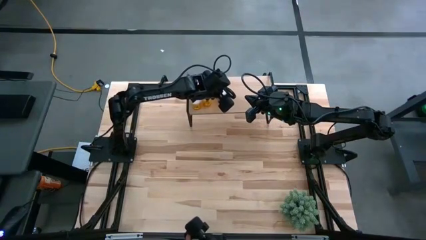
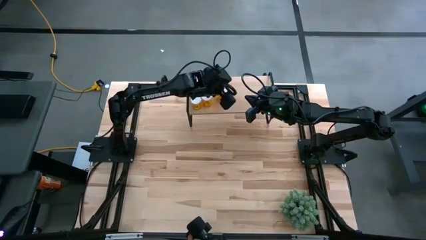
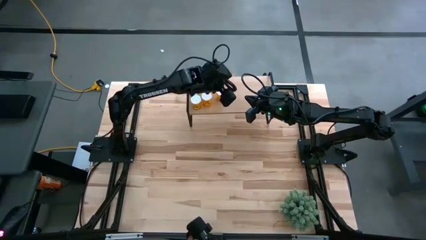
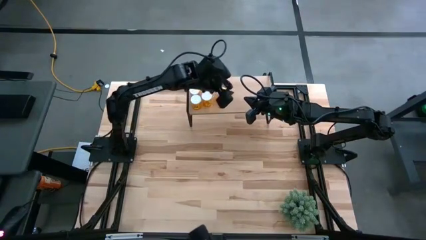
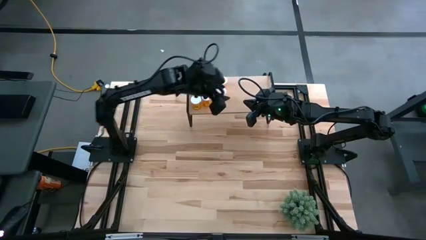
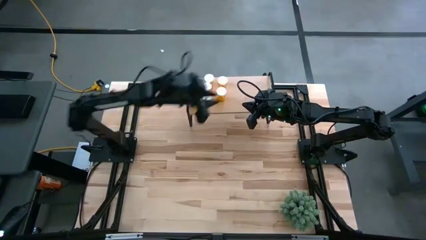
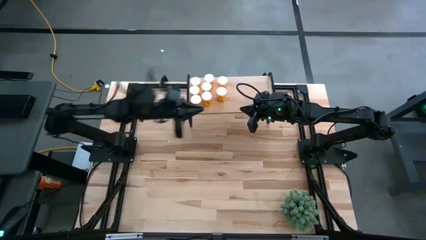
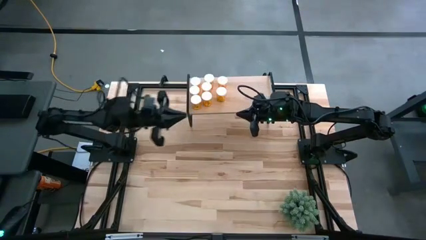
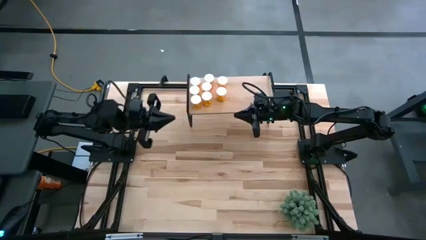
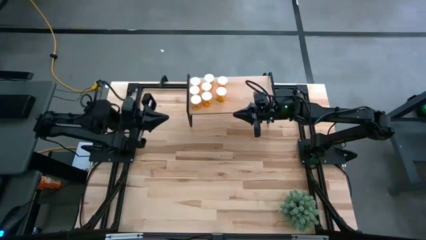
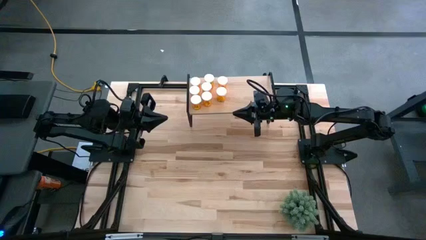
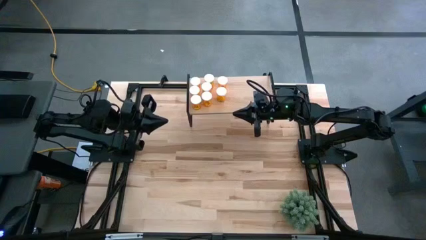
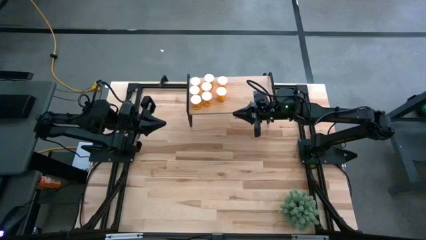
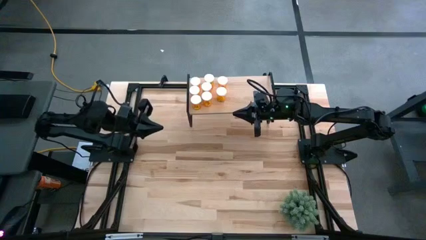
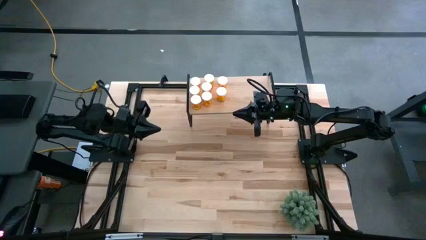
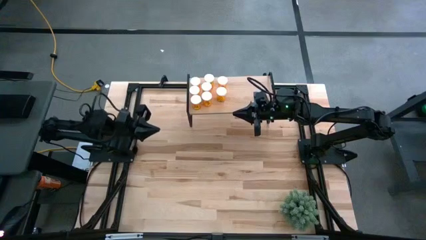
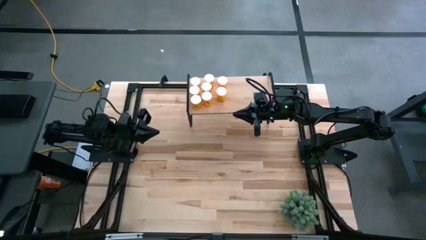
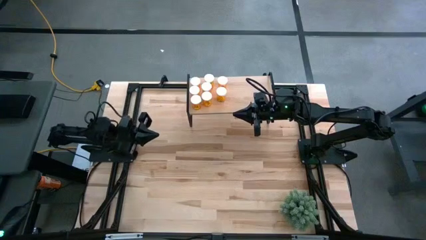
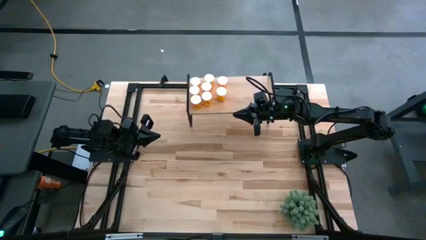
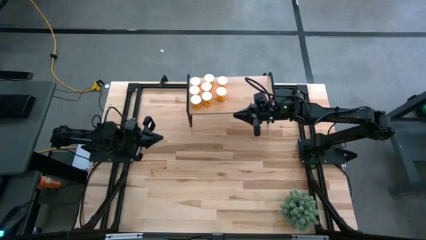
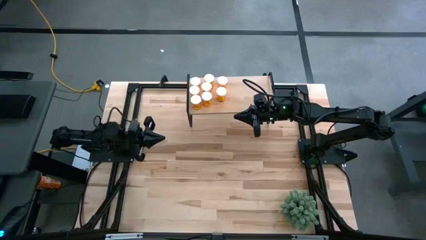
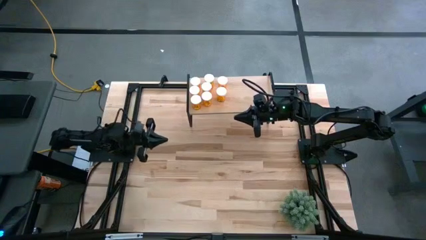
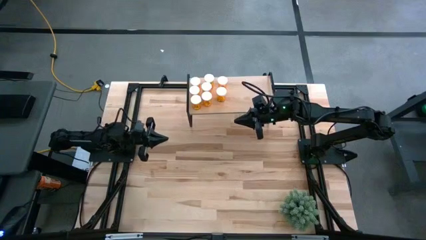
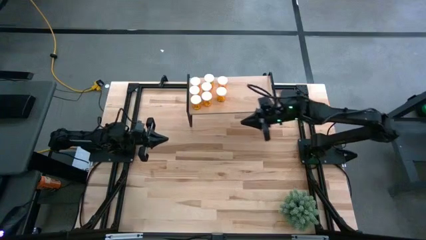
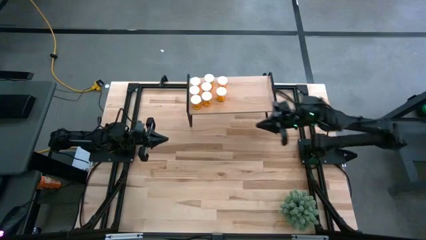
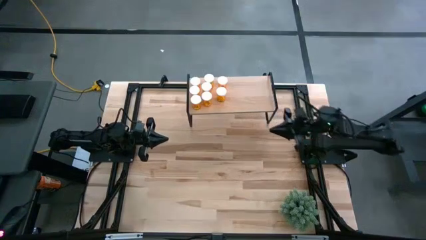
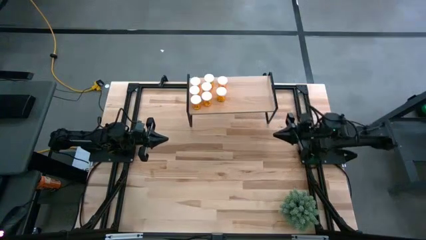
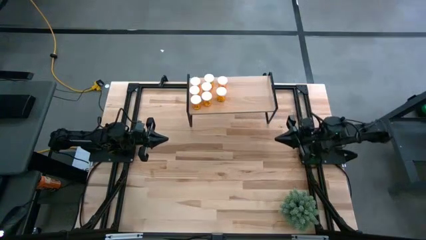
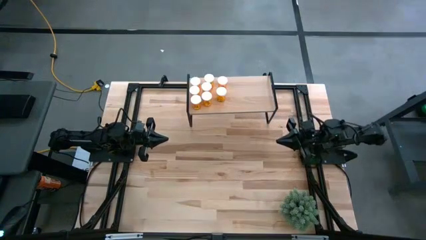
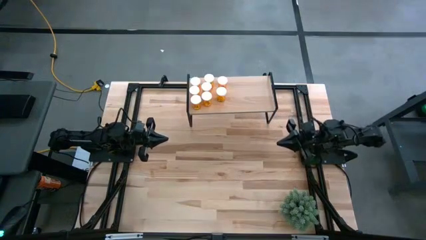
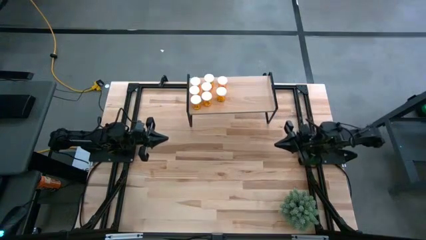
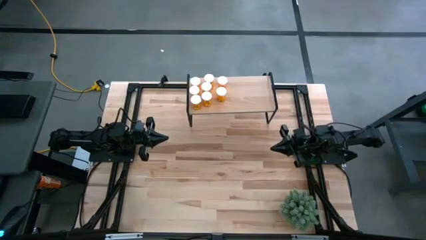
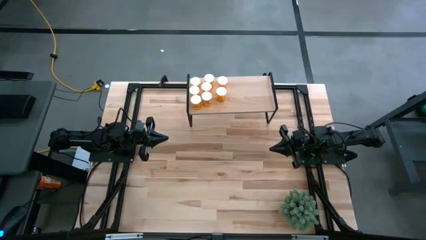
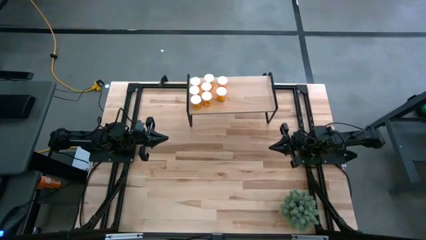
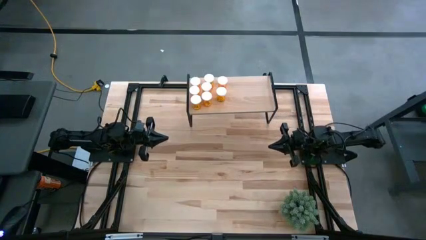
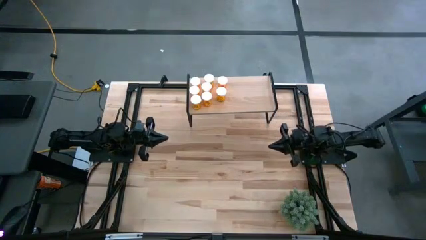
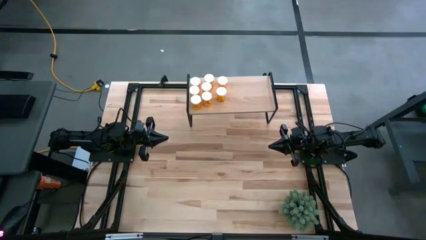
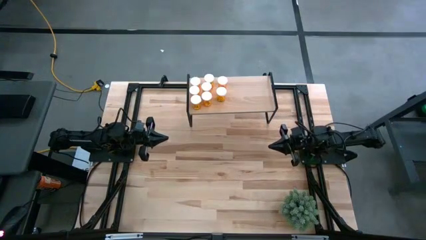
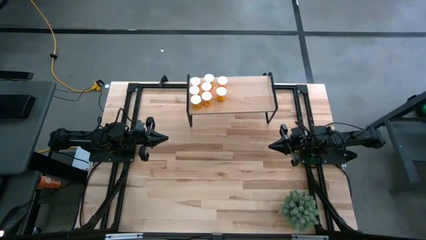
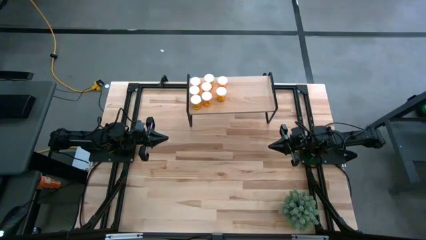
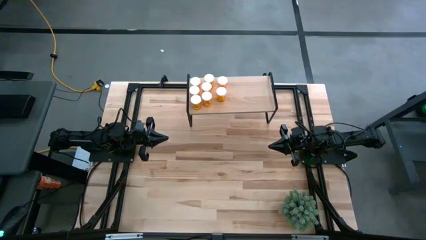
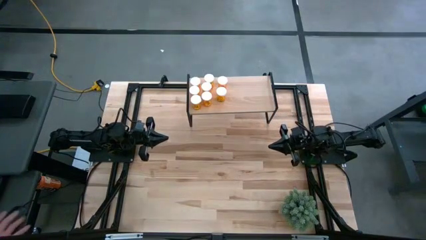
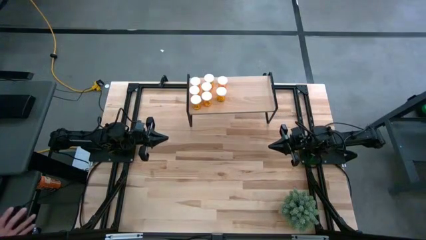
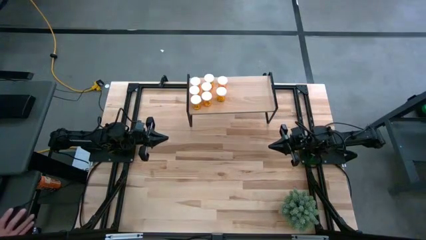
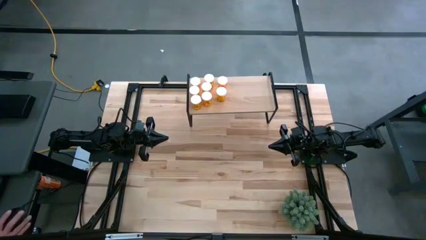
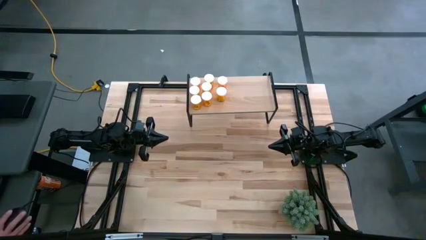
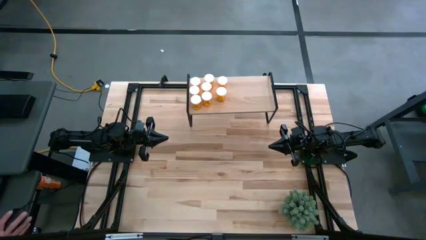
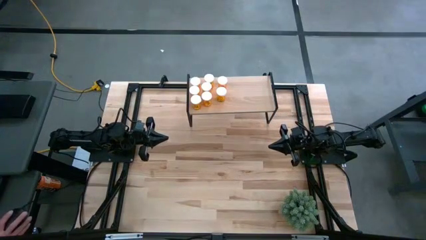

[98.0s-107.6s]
Task: Pick and place medicine bottles onto shelf by color
Return to Home Position

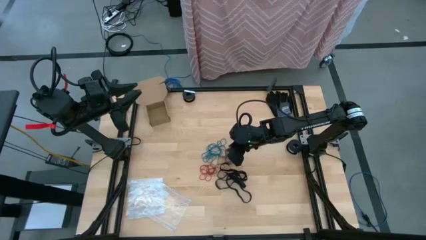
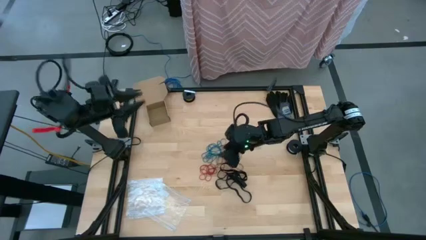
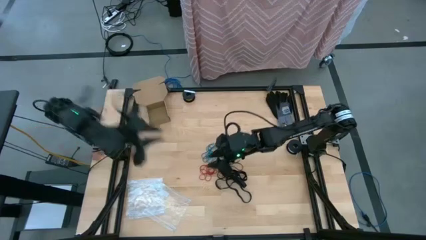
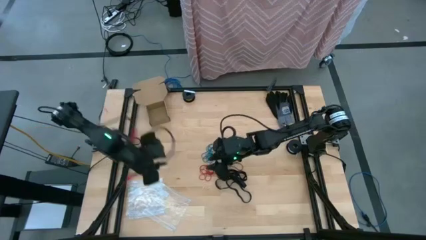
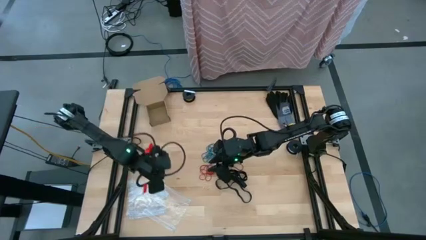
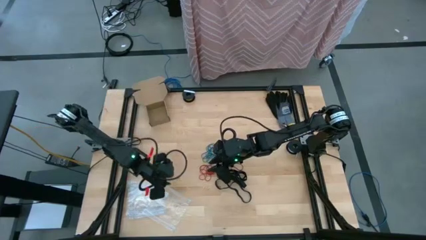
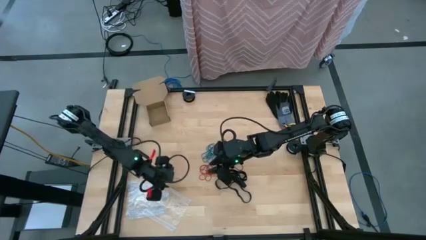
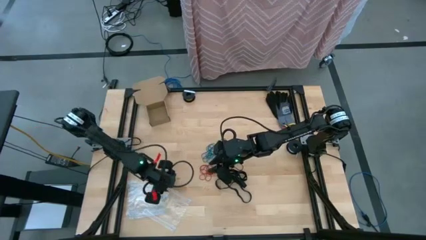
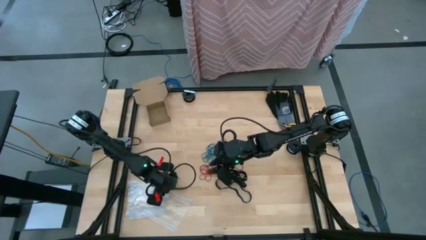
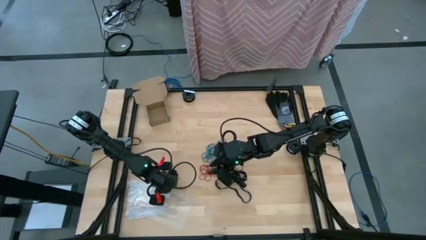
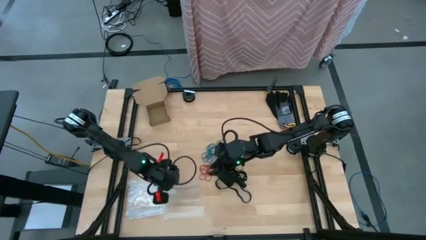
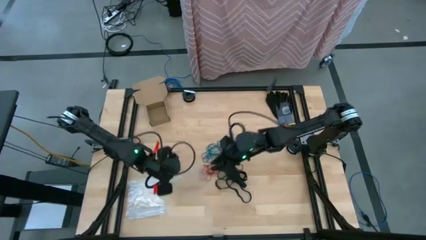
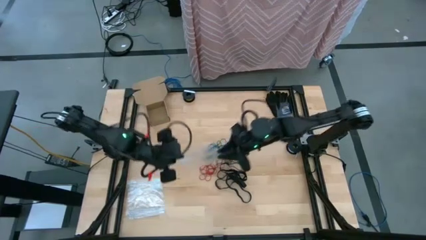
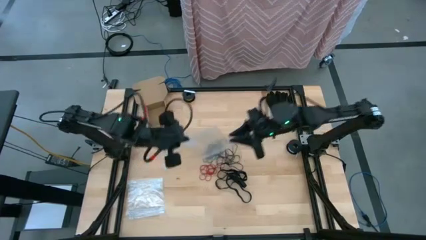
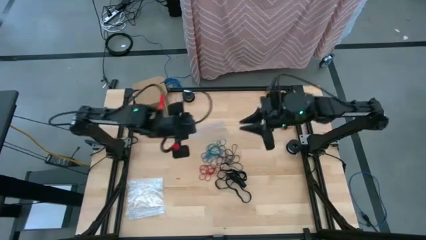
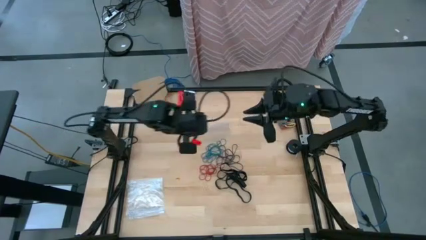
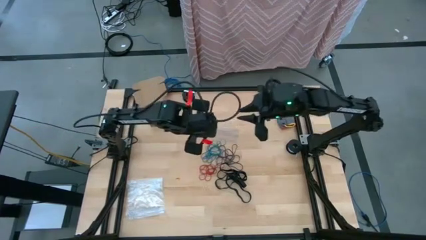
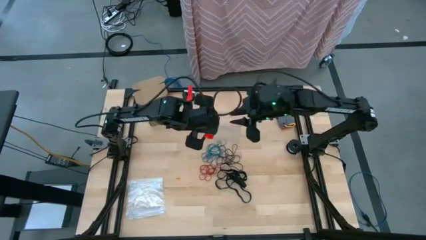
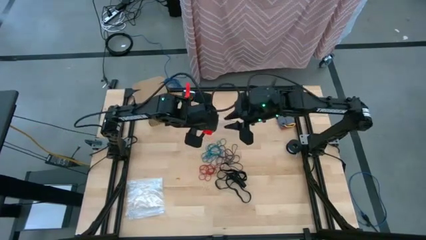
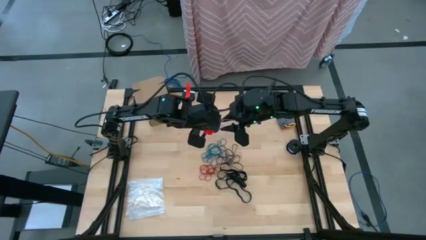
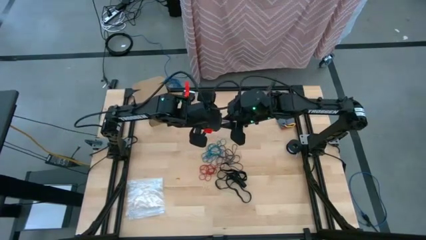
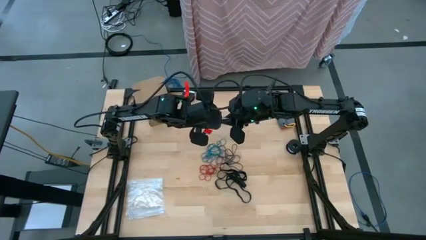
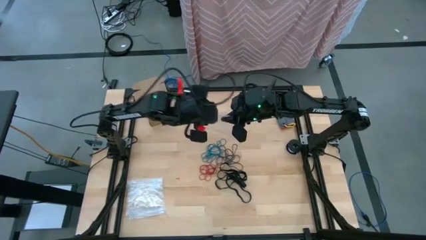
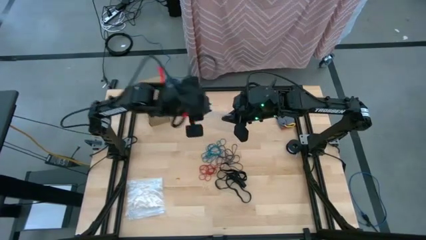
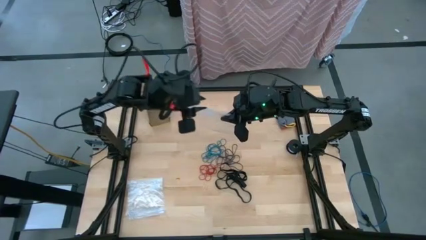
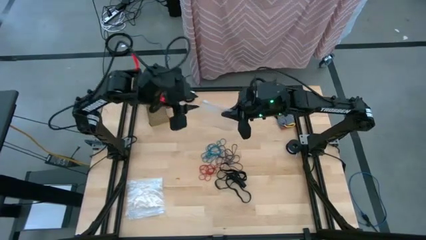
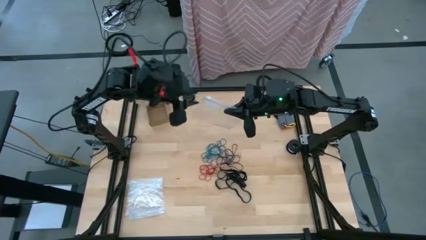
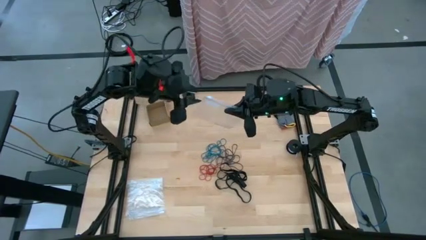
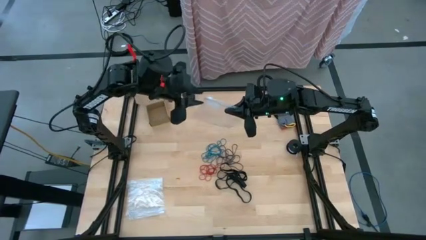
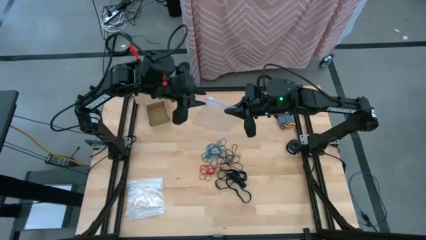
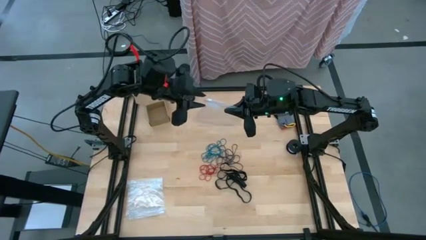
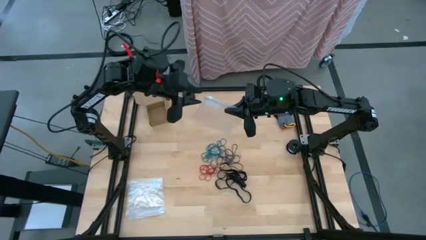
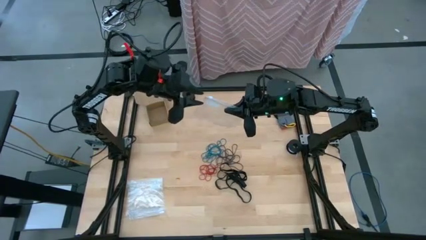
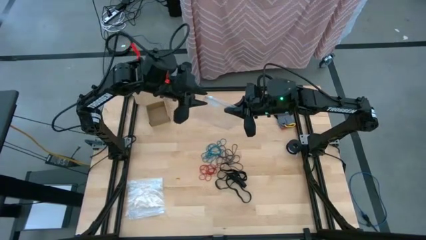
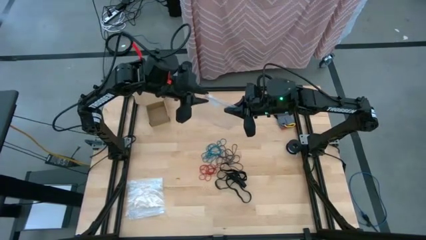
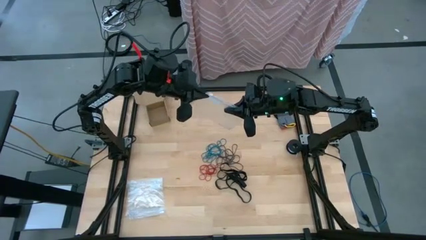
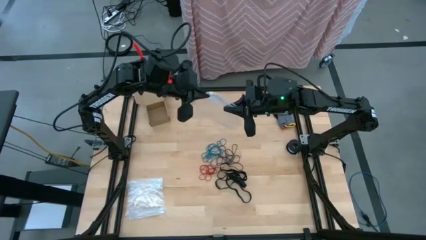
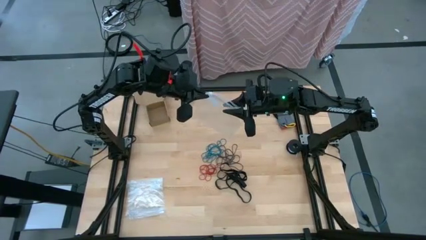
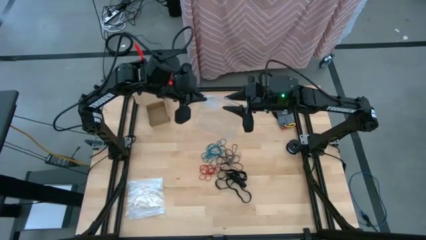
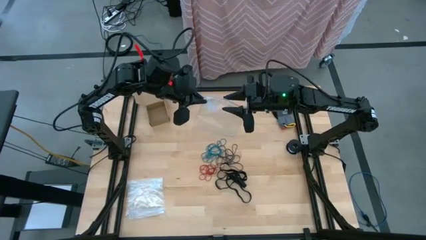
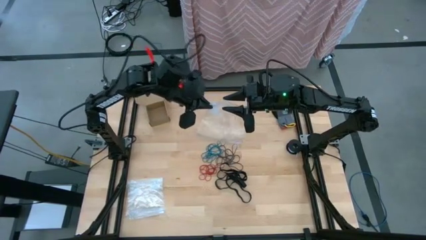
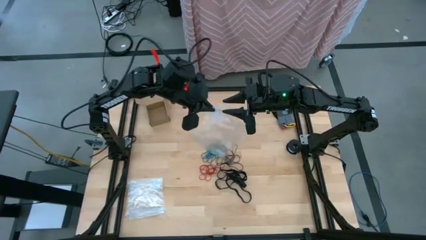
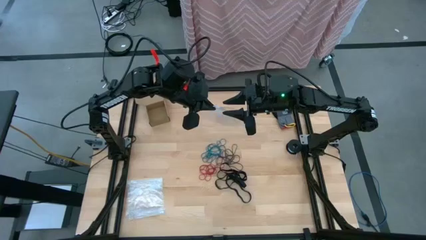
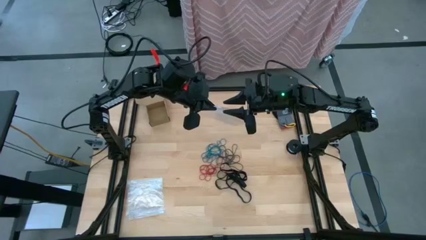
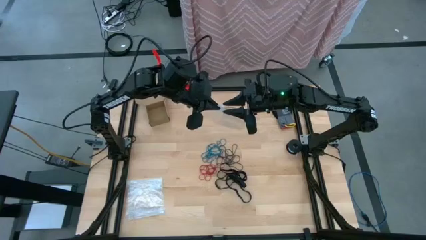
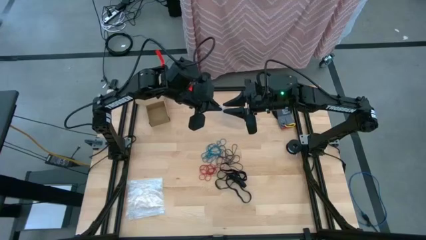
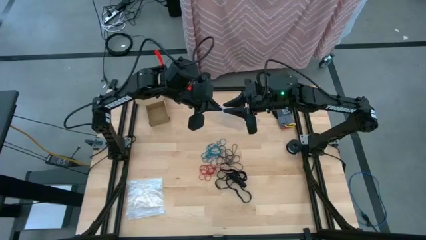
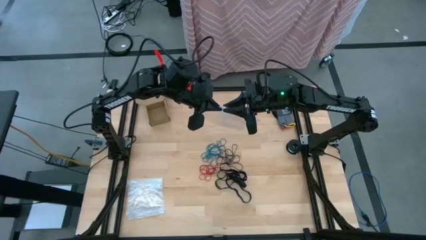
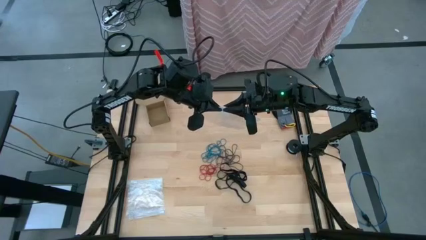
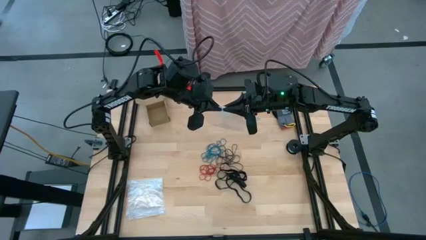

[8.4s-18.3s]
Task: Sort rubber bands
Close the transparent zip bag
